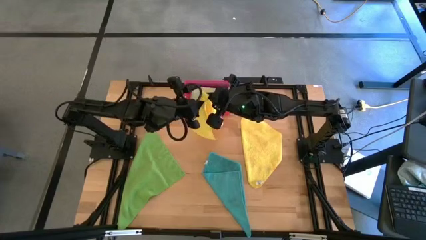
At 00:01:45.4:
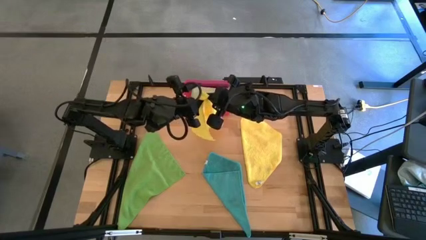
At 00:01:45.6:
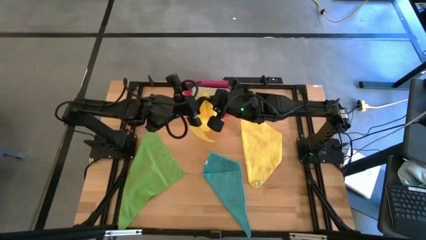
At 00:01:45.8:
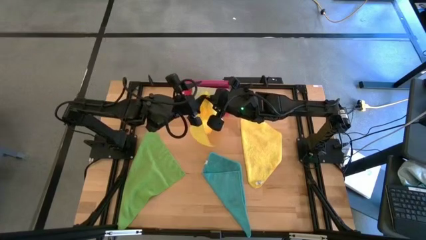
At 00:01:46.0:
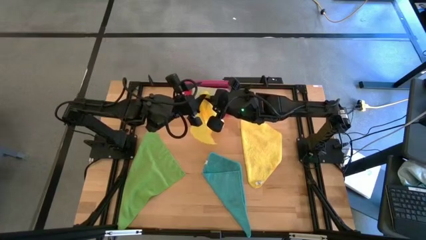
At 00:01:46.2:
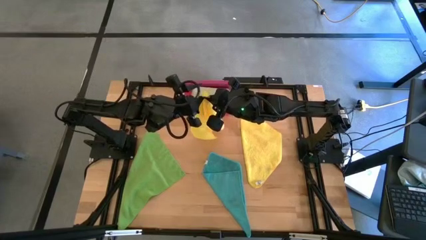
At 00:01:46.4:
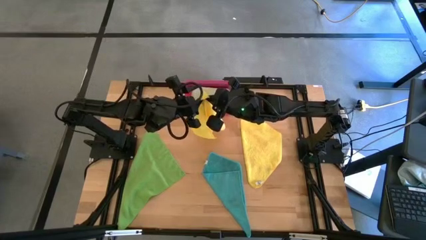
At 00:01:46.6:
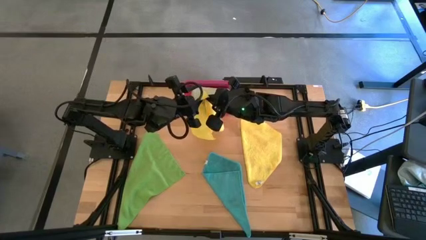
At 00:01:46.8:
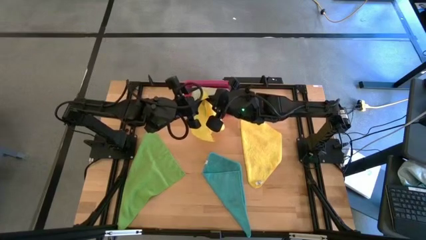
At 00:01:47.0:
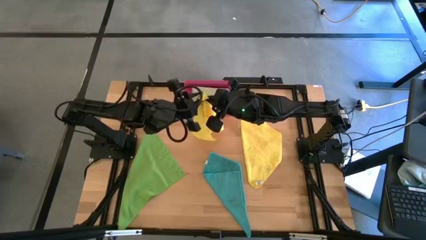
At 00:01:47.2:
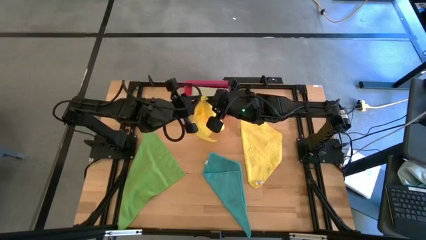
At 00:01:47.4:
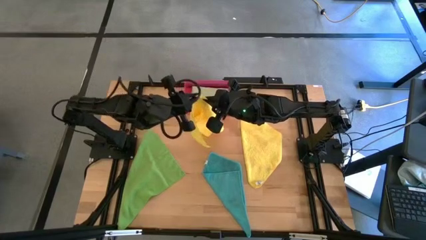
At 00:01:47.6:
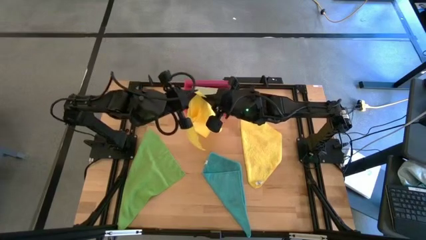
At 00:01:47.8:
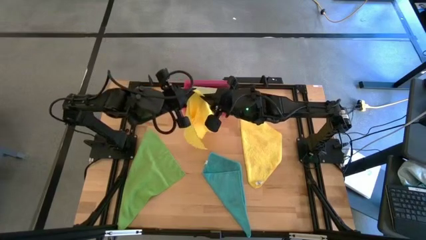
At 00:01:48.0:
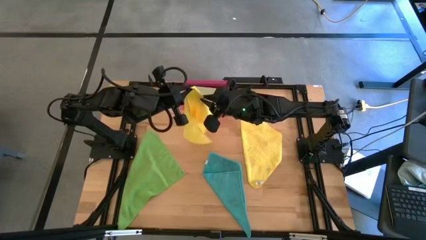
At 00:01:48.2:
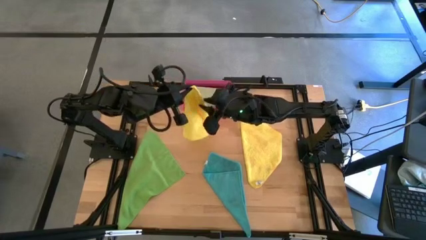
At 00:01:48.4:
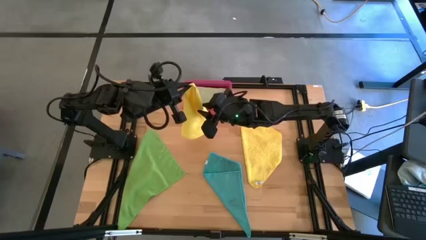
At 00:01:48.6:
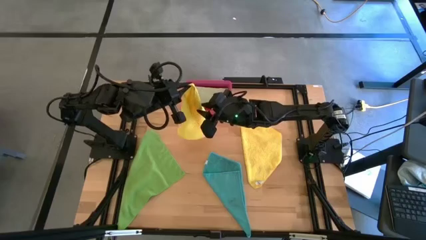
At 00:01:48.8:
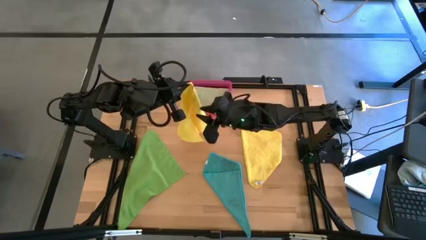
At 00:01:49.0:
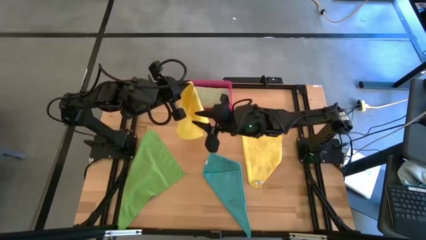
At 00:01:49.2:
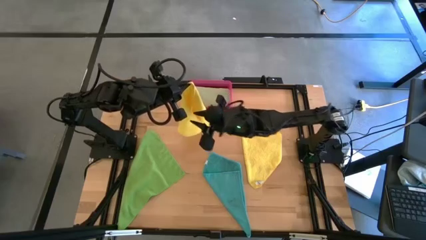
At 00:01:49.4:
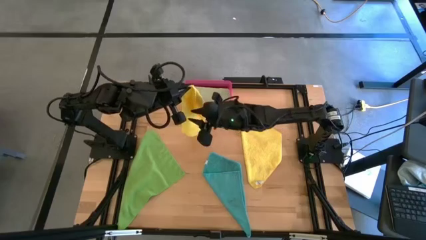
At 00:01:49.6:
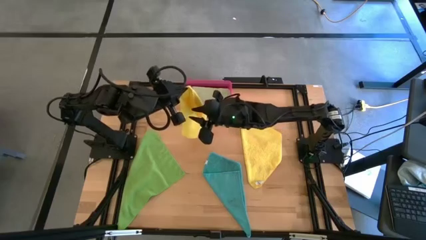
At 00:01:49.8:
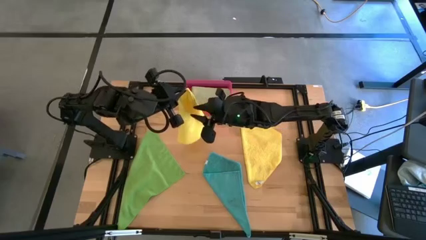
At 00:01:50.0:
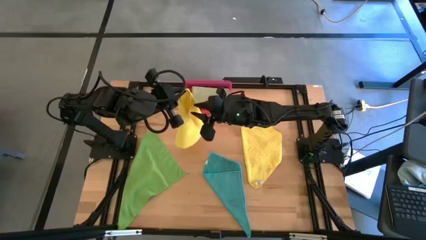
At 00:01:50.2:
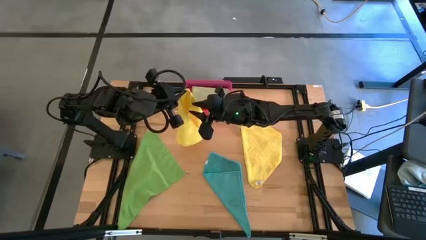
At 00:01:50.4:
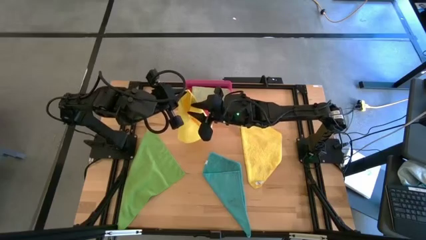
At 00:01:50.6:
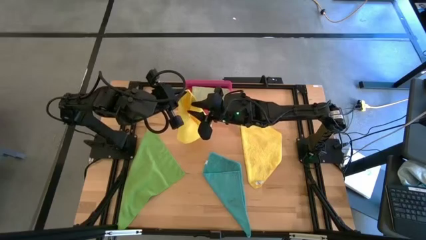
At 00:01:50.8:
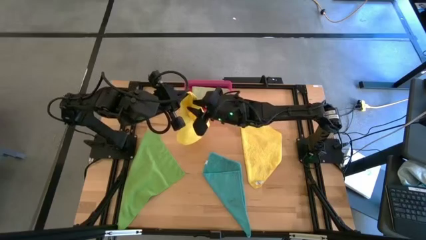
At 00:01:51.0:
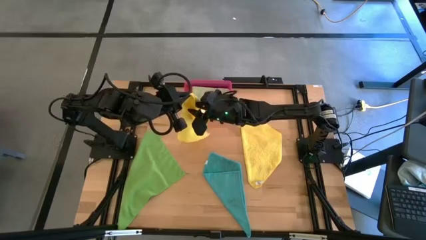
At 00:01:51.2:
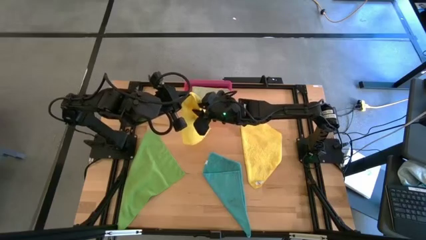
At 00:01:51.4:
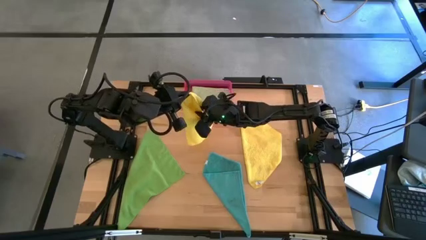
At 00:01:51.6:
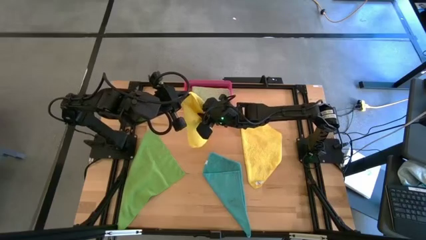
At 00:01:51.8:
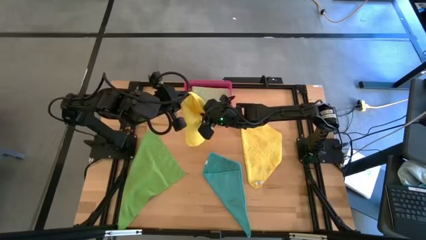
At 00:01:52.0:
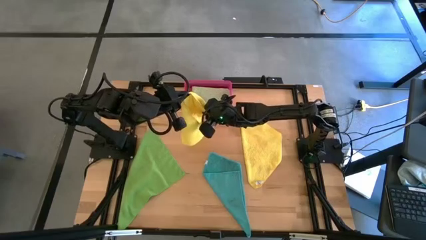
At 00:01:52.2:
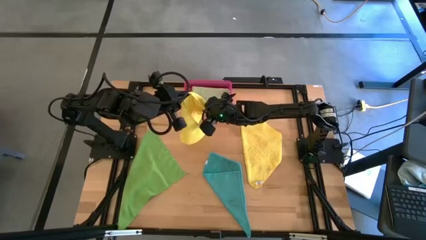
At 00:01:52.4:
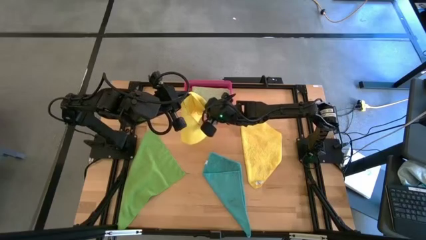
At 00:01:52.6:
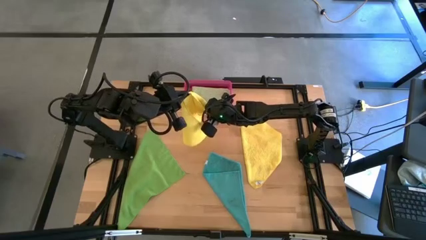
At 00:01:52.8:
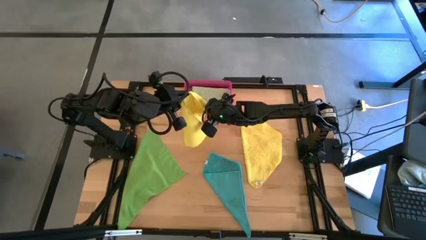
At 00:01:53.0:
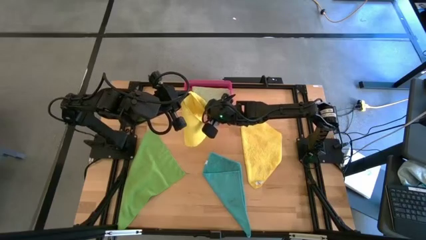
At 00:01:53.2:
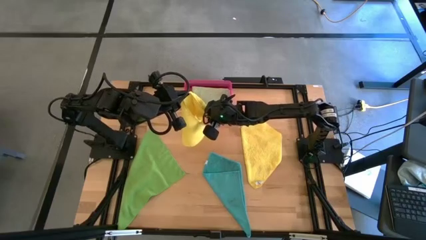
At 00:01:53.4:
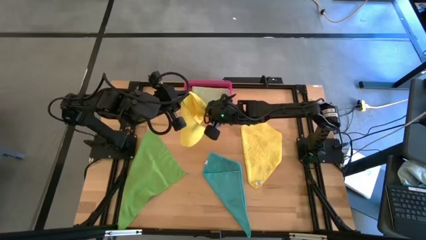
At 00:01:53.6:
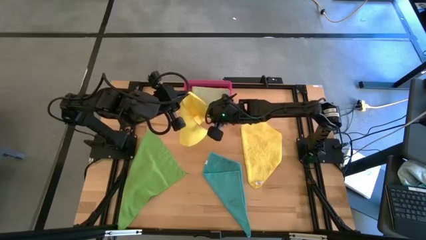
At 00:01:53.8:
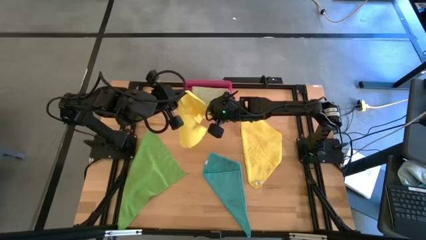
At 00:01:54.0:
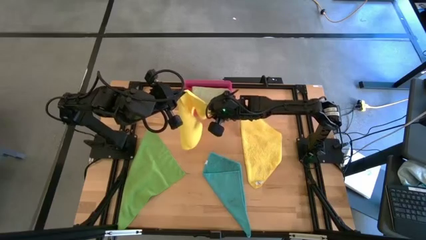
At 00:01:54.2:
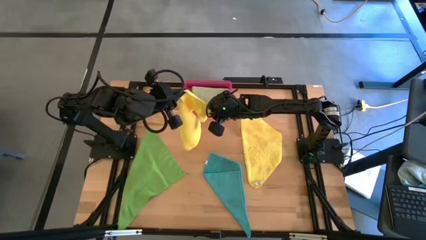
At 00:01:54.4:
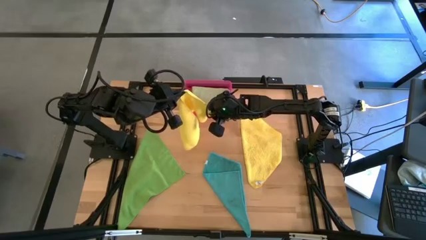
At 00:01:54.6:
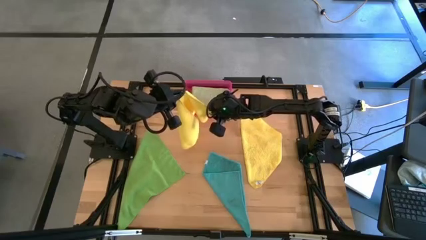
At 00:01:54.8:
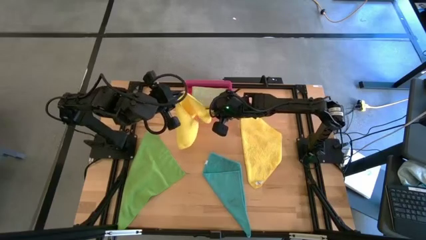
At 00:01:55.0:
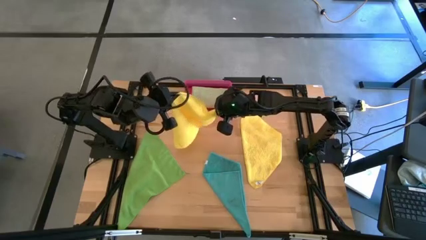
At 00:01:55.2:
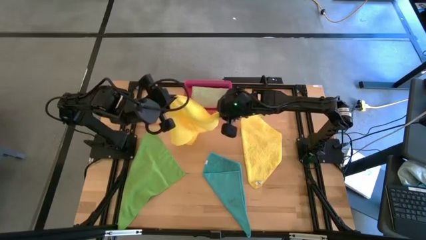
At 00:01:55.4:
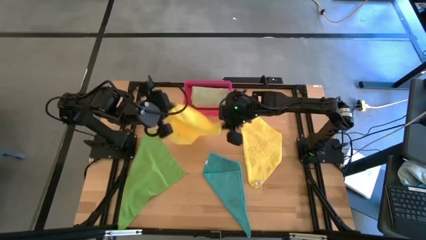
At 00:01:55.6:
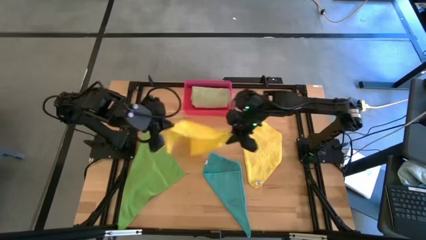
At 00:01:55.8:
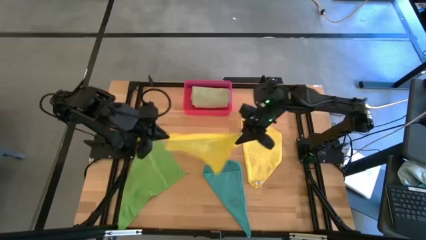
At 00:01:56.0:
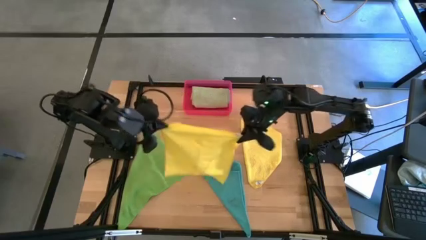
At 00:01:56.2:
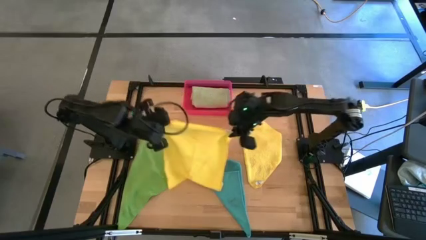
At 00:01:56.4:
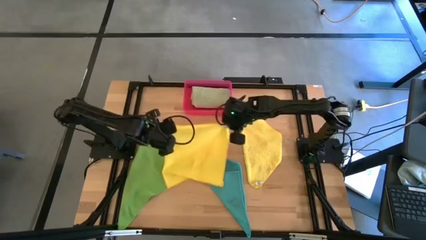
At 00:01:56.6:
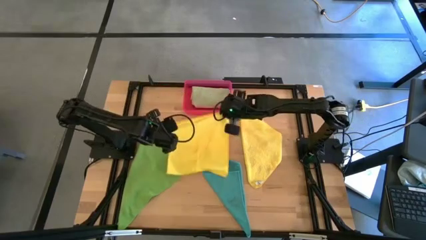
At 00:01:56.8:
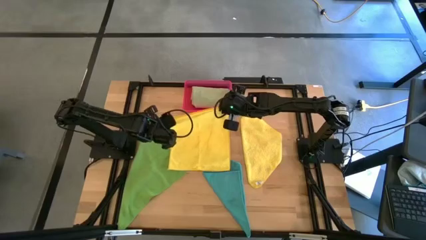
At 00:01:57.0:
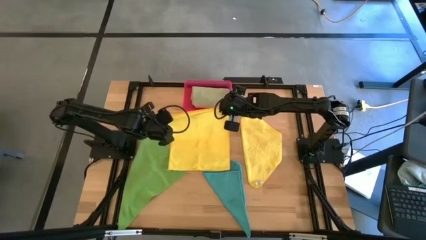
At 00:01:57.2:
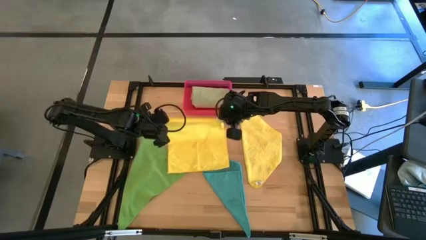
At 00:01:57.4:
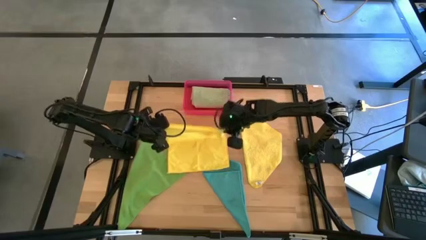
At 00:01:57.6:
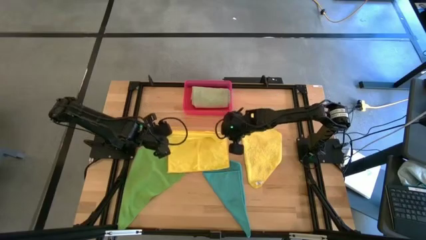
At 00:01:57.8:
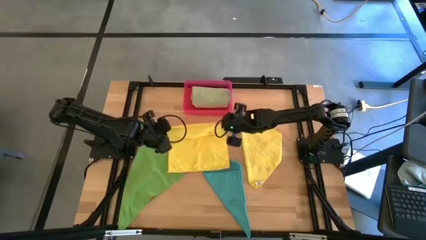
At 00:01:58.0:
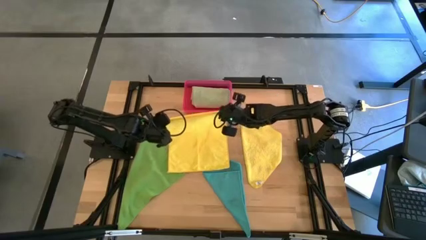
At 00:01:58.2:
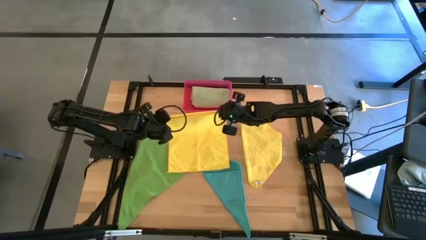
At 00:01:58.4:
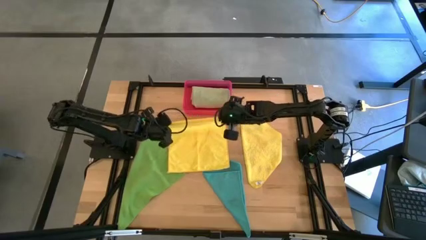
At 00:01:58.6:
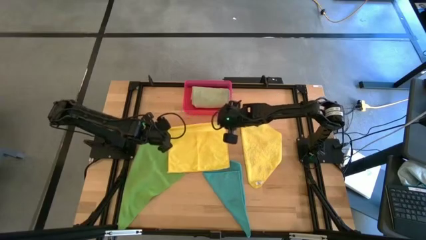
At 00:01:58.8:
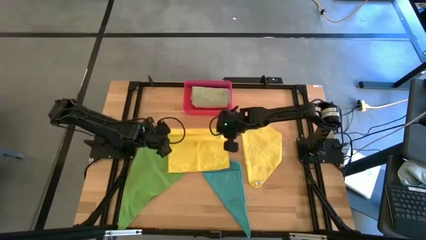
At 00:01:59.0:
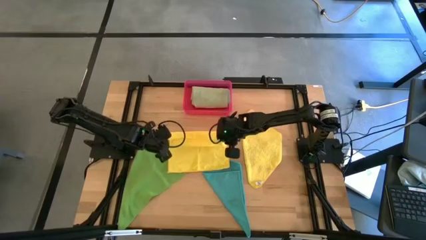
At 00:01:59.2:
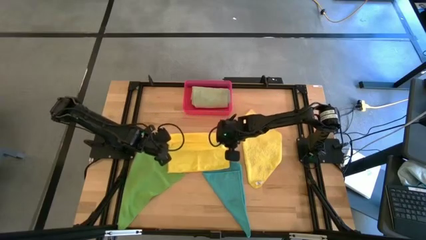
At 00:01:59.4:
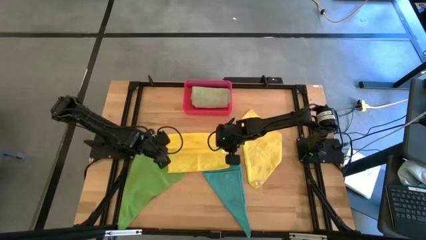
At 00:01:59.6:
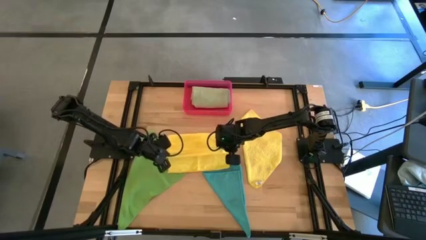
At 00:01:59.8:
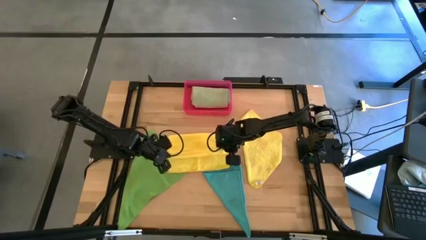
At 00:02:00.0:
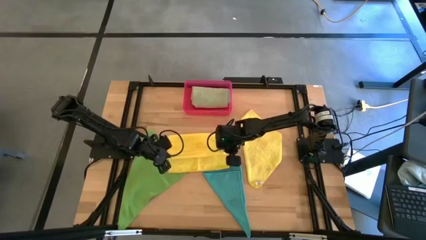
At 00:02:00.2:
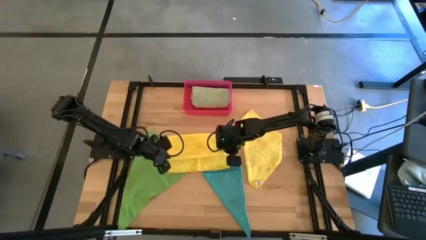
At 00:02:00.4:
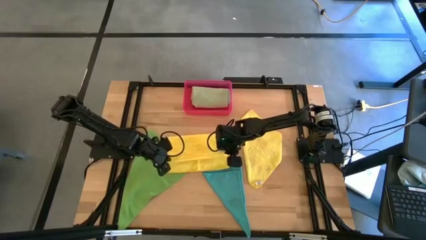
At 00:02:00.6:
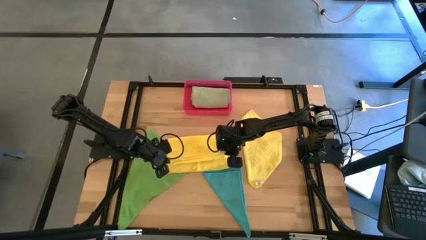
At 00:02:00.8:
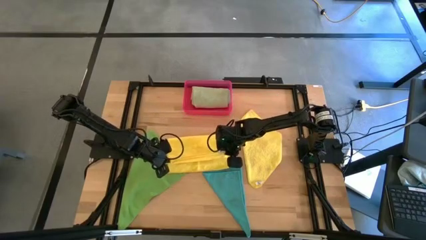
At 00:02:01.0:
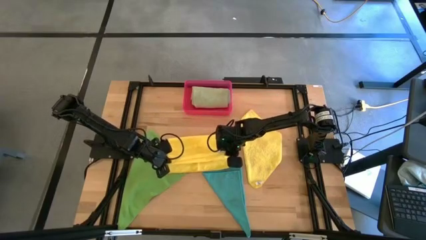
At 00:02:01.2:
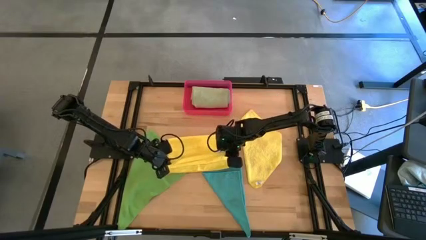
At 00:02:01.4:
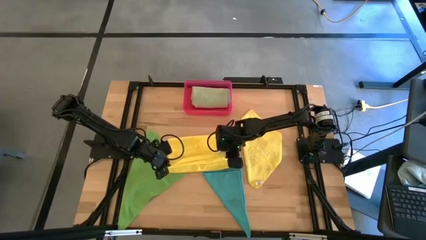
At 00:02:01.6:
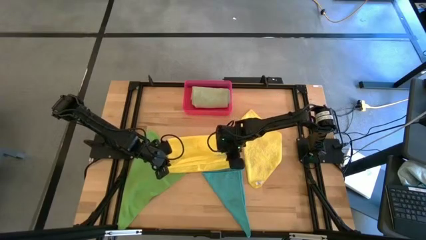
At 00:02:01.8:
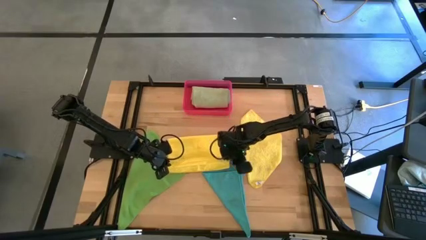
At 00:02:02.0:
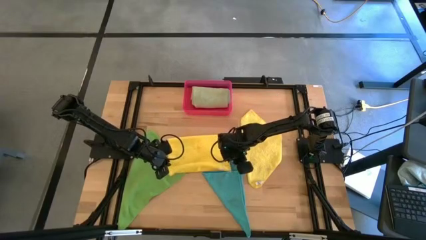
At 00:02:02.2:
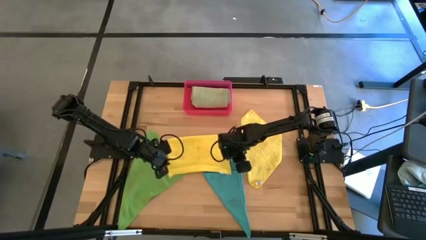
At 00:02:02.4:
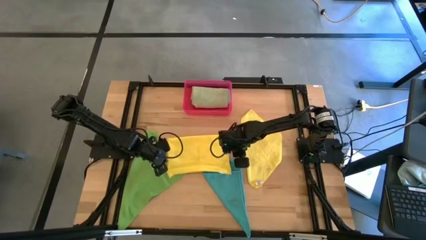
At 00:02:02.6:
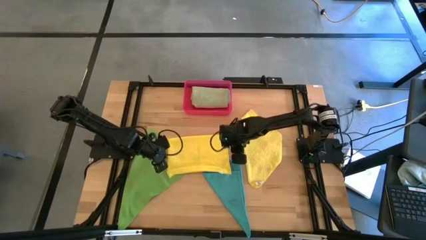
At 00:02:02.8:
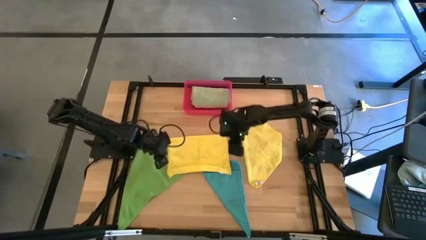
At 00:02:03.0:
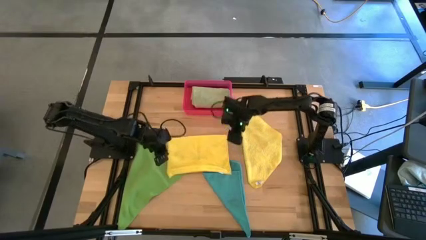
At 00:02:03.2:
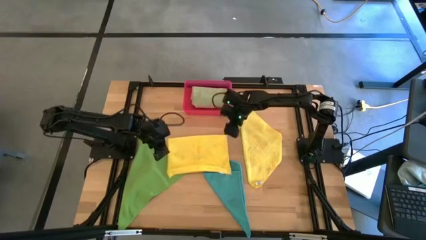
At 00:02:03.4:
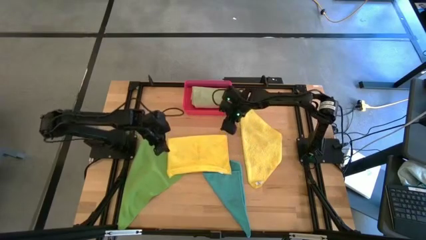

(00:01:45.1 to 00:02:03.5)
Task: Fold microfiber towels
Fold the left yellow microfiber cloth
